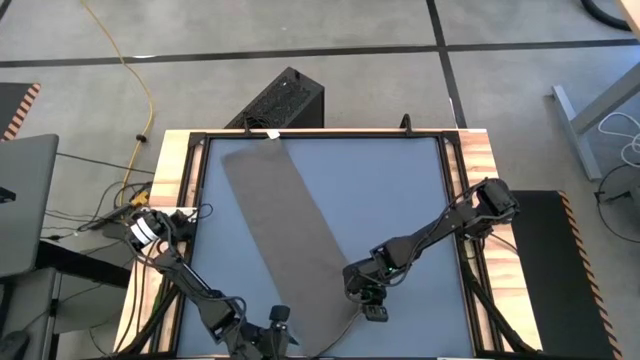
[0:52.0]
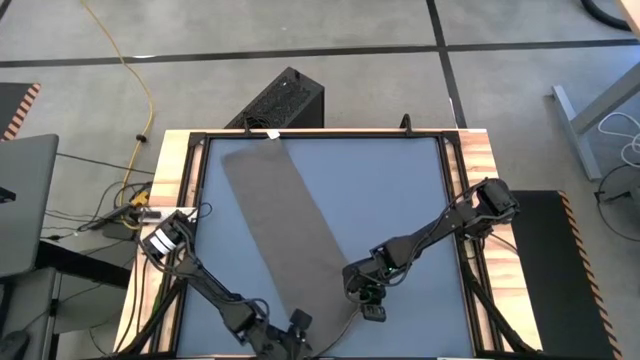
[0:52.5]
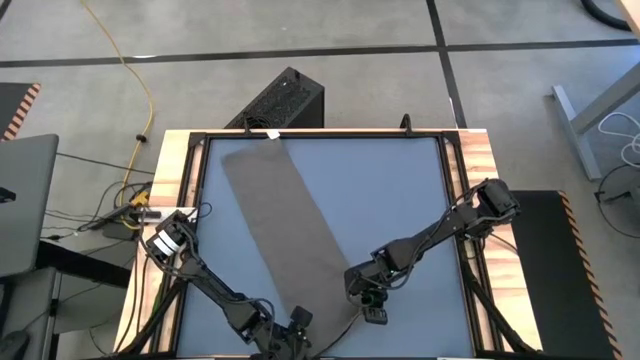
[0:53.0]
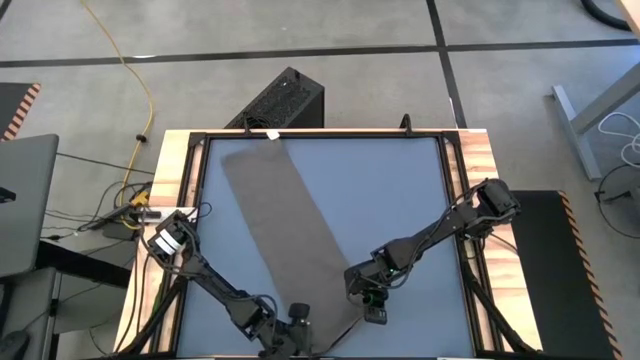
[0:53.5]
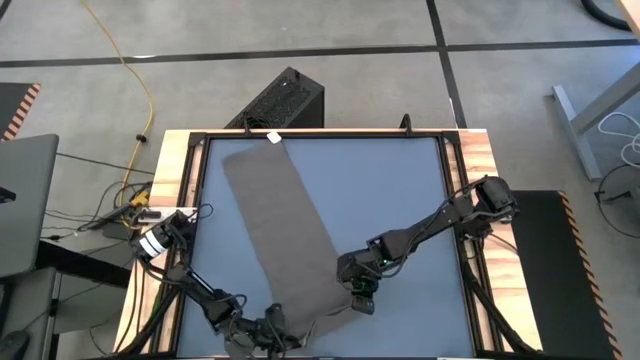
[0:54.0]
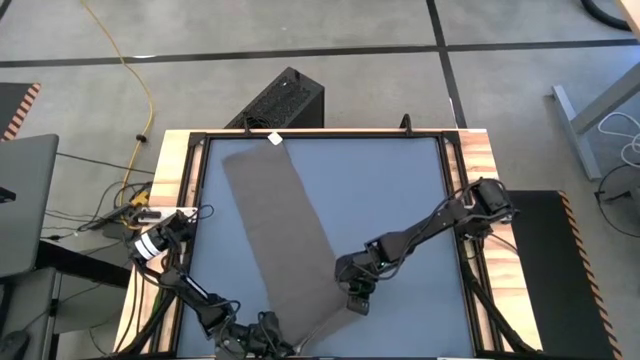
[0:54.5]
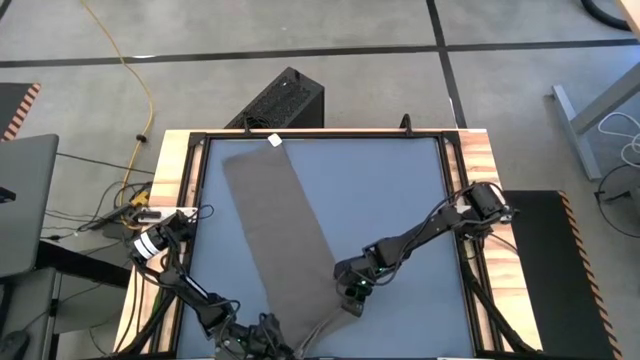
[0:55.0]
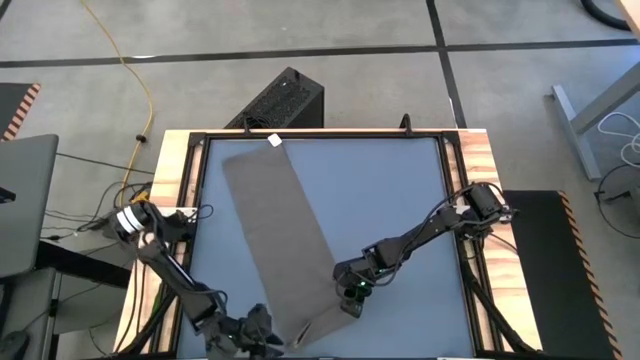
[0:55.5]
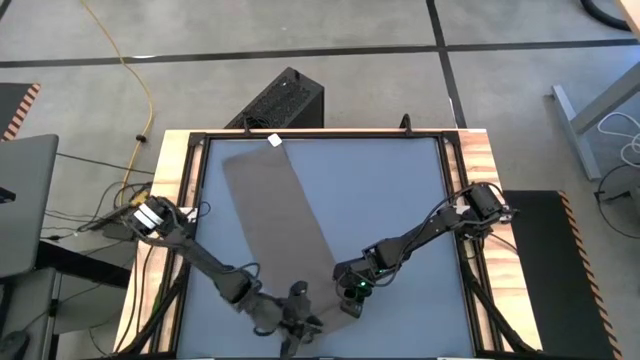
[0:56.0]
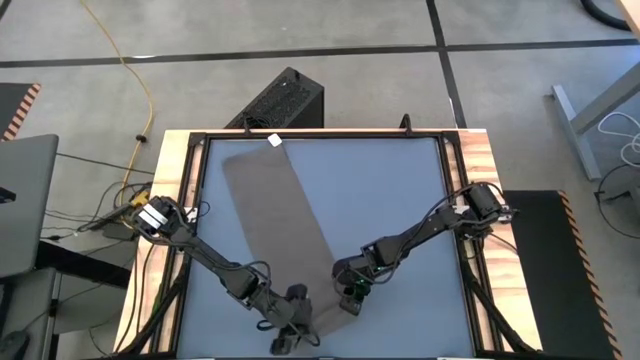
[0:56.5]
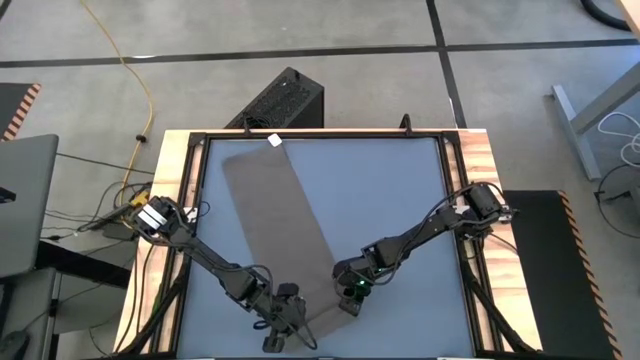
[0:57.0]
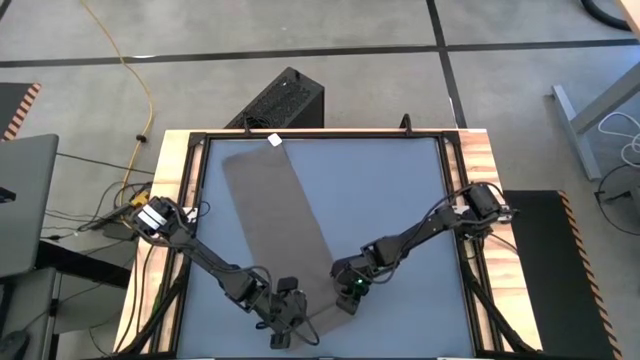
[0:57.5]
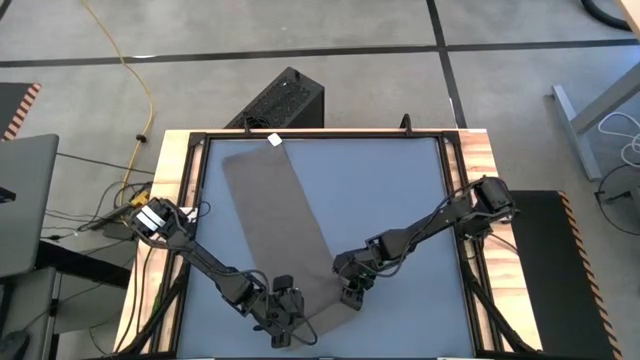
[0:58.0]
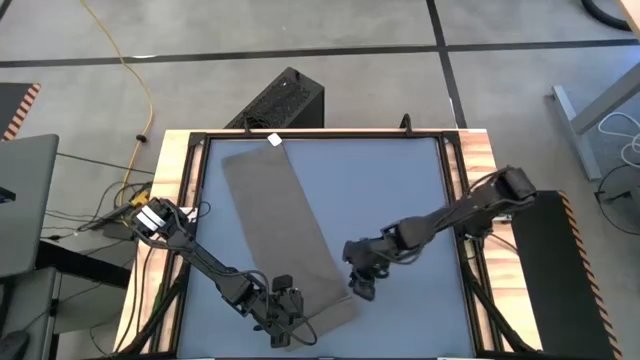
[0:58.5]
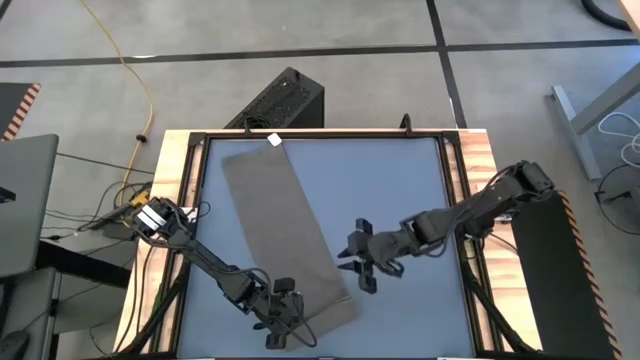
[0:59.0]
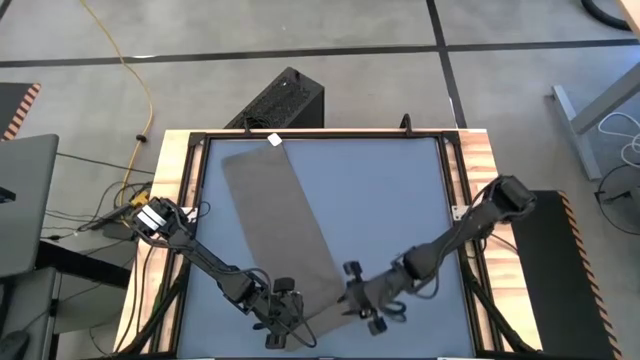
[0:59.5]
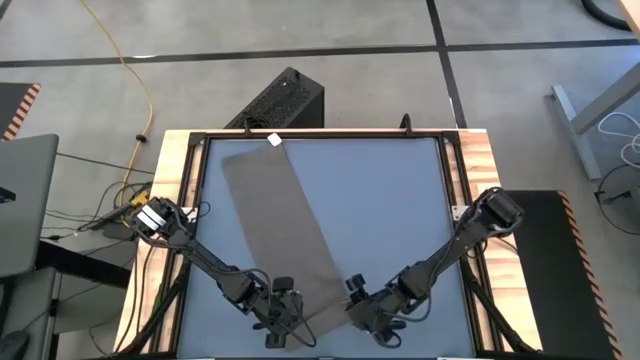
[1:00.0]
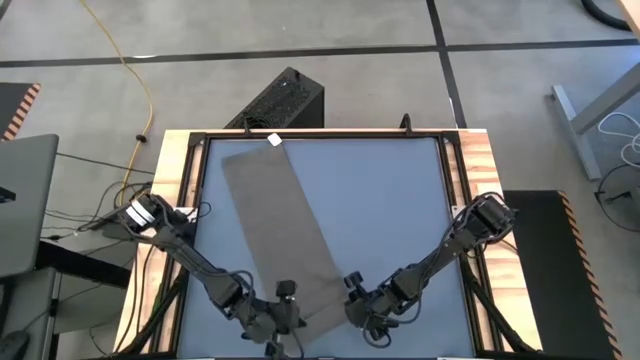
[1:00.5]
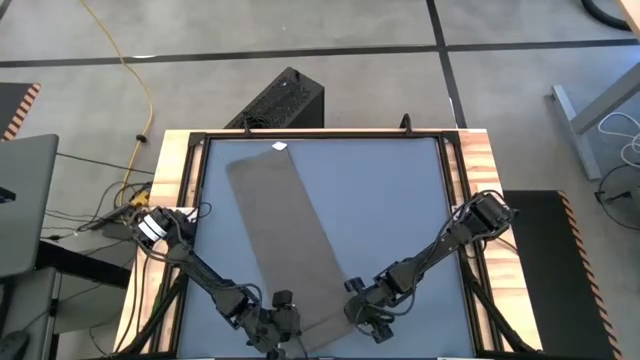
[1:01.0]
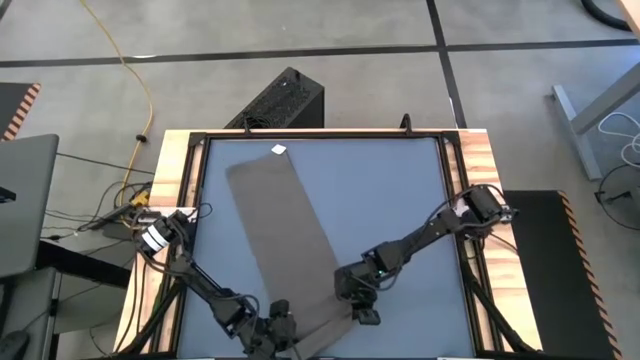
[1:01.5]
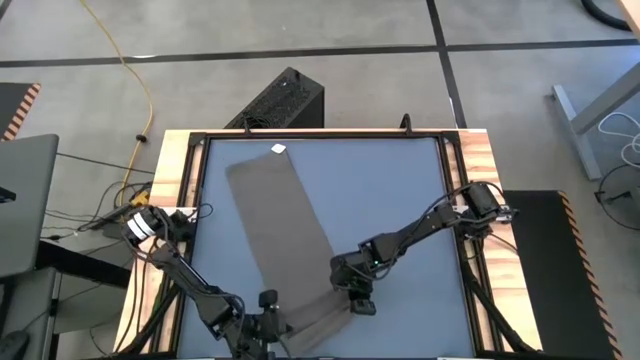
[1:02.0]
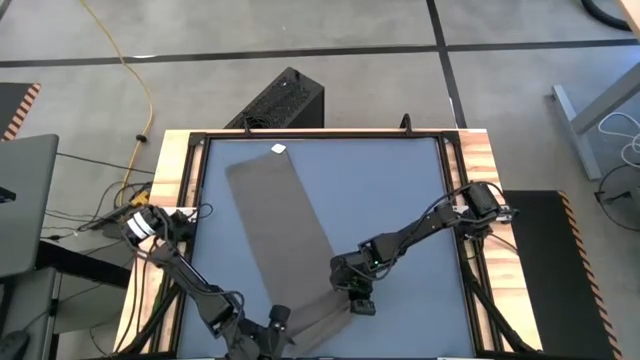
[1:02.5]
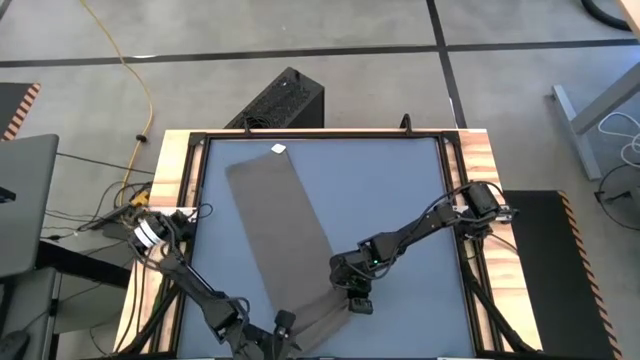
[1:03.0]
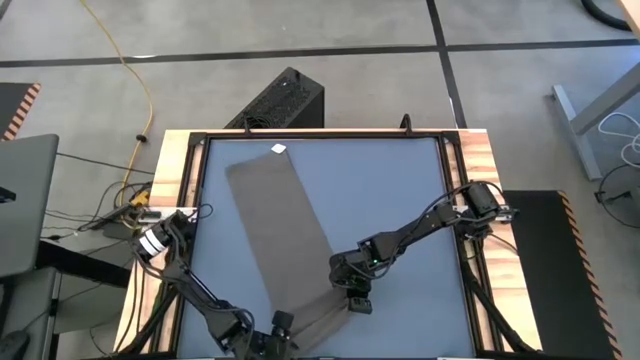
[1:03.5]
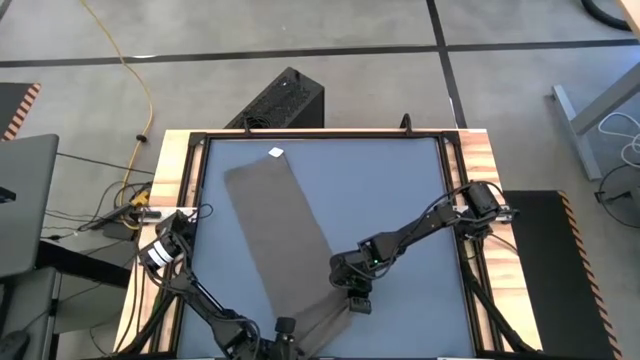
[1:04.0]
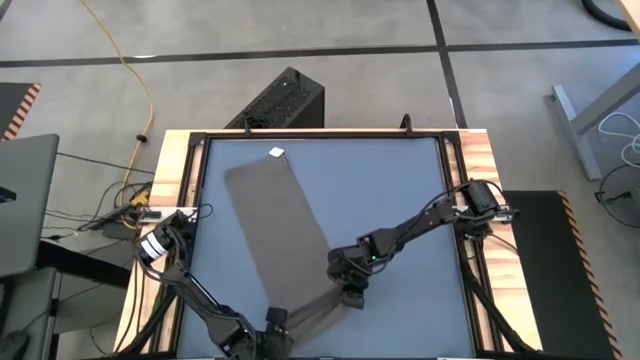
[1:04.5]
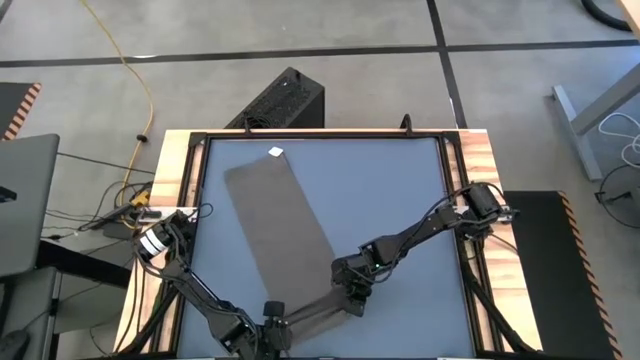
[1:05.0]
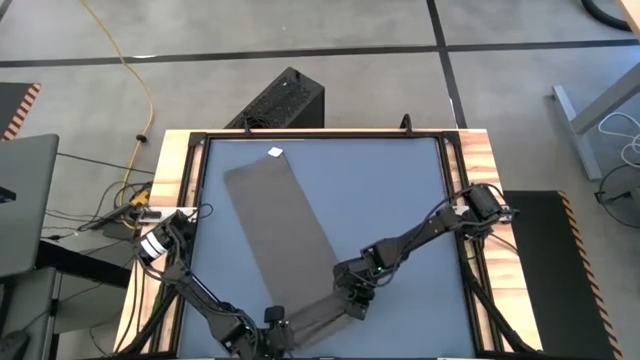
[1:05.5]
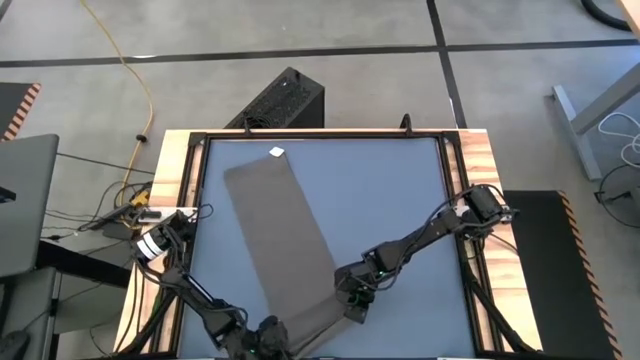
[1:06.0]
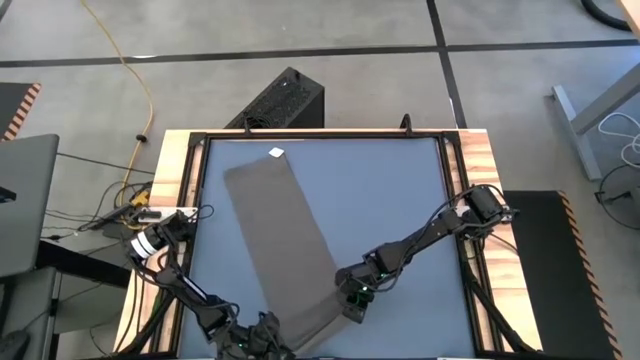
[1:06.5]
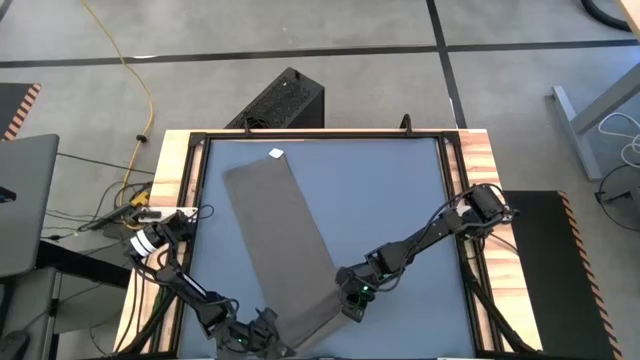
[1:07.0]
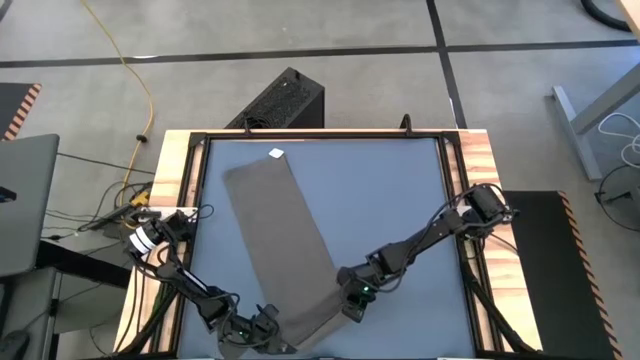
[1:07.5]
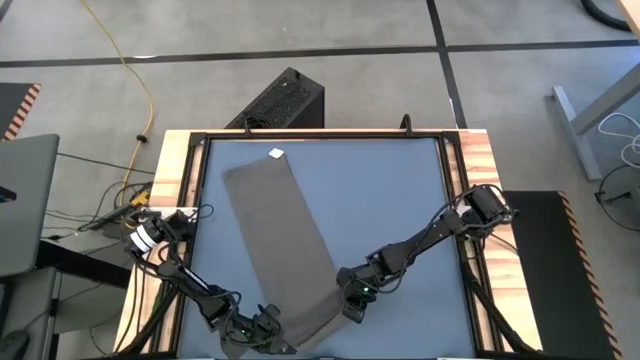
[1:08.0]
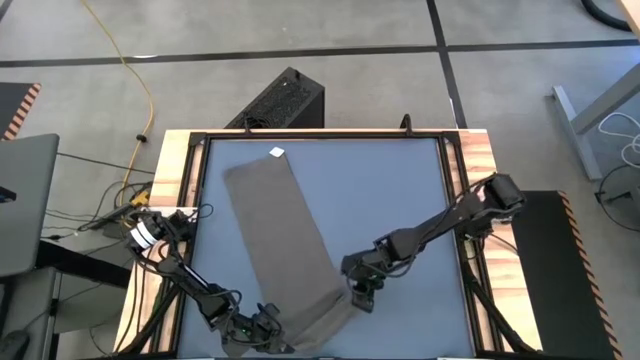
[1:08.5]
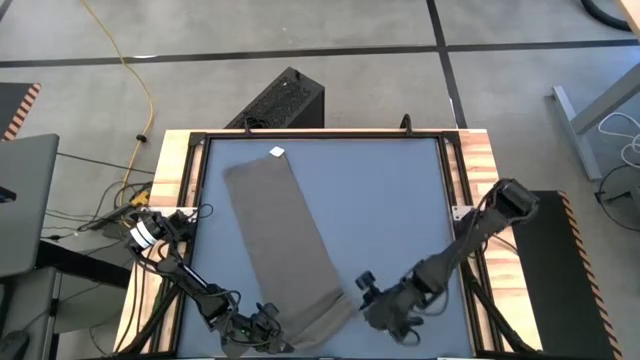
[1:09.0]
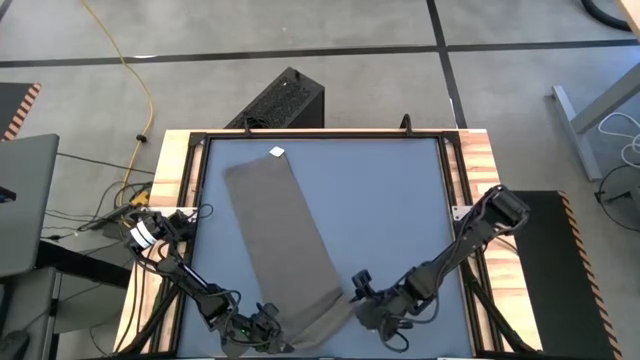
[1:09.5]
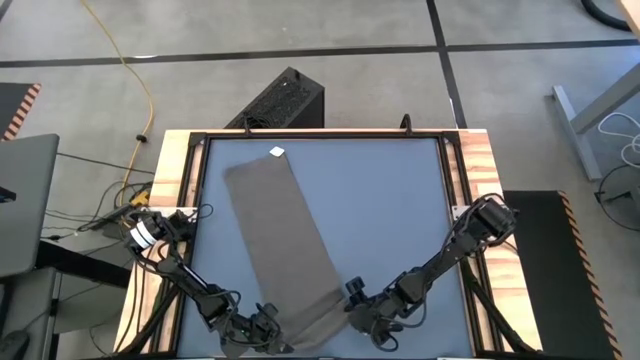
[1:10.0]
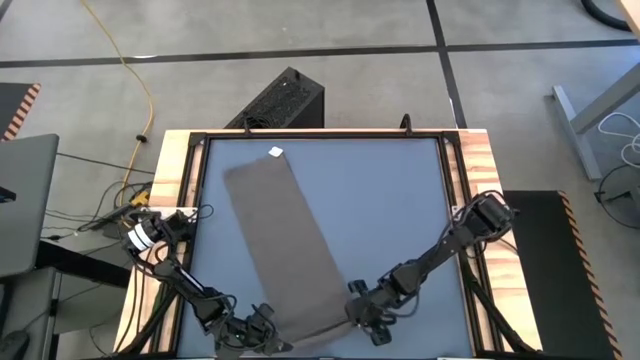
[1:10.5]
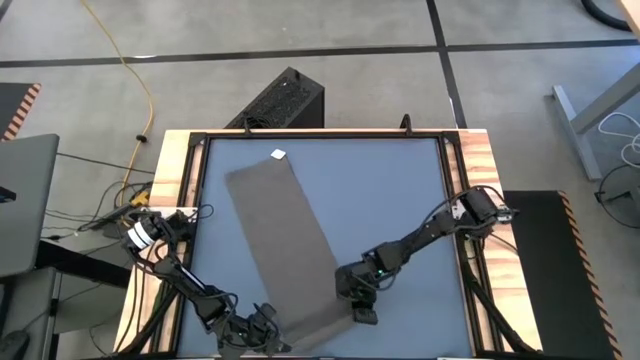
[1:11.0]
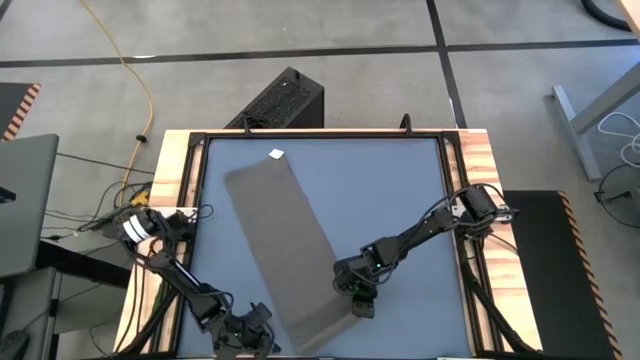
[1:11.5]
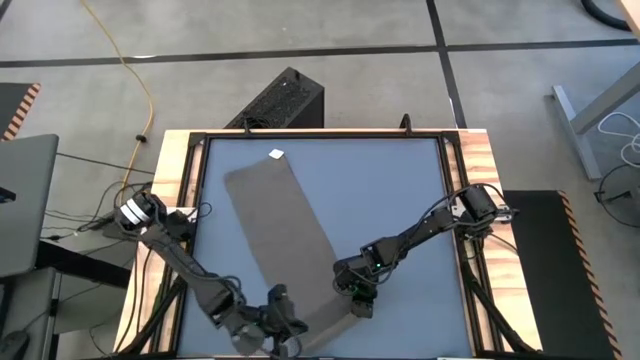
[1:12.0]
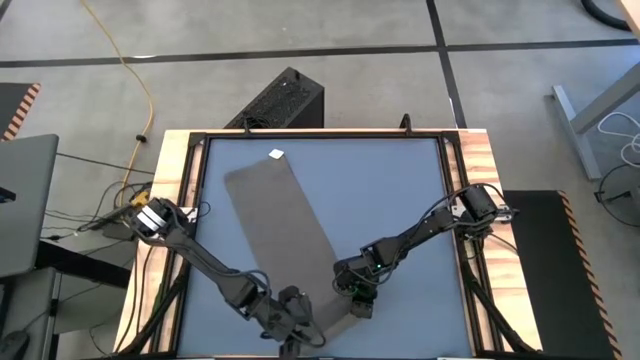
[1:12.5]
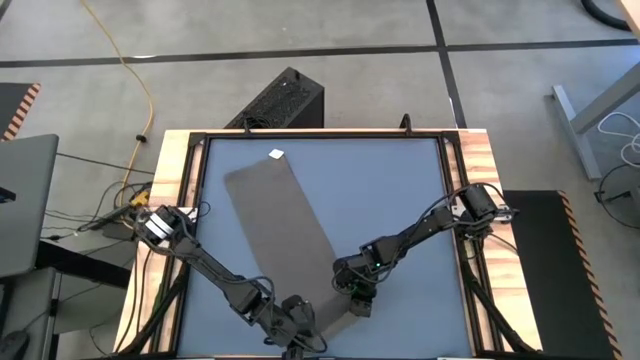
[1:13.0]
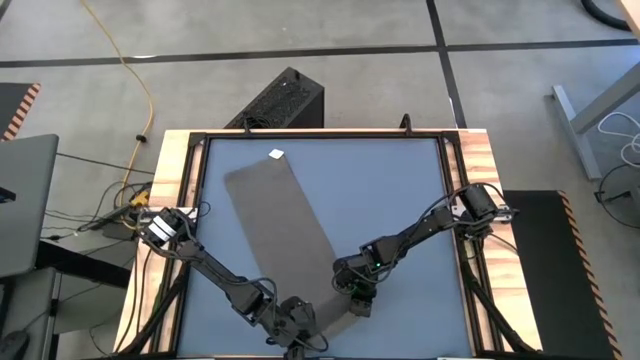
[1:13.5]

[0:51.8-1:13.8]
Task: Roll towel
Roll the grey towel
